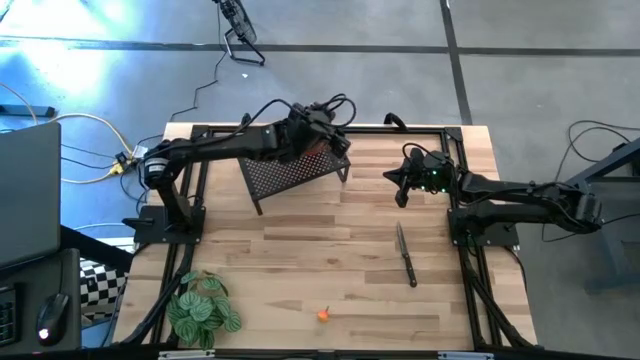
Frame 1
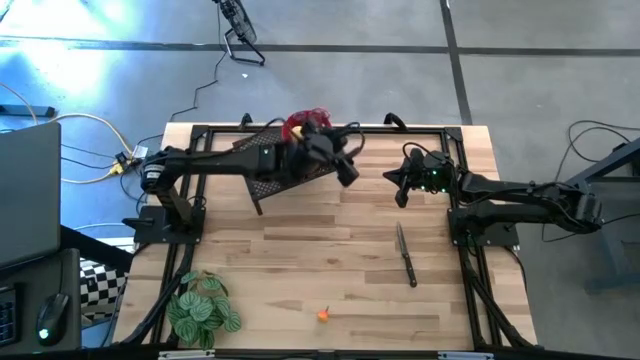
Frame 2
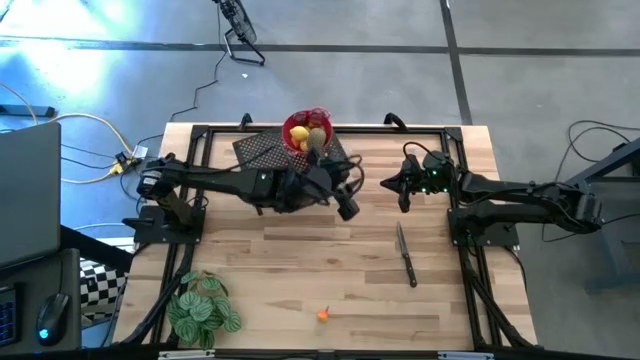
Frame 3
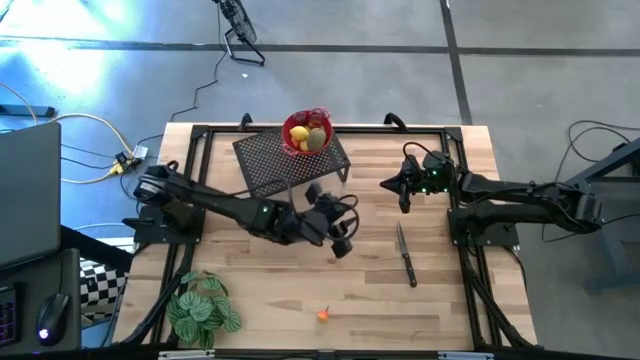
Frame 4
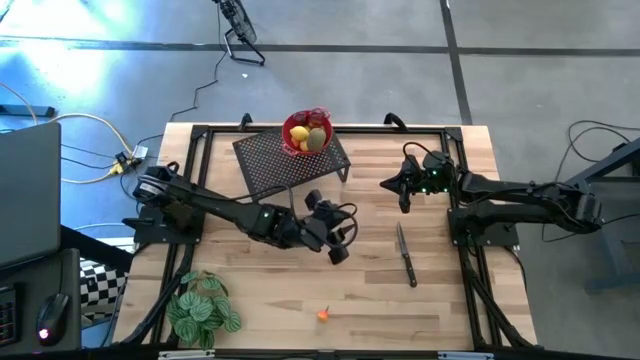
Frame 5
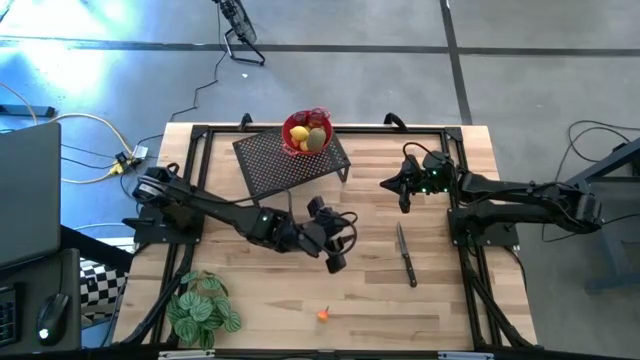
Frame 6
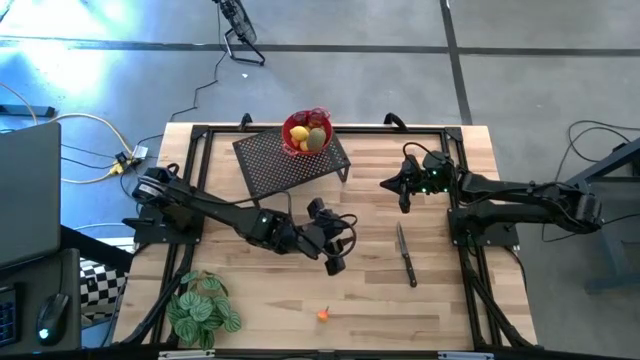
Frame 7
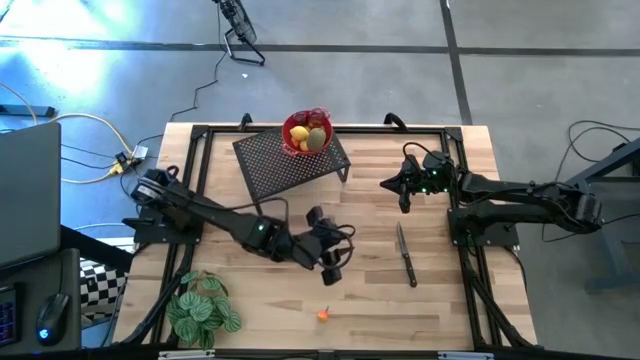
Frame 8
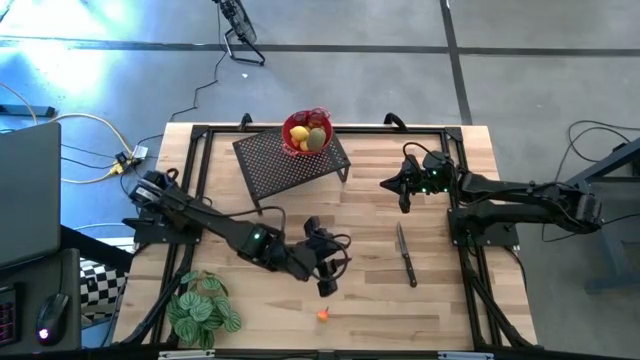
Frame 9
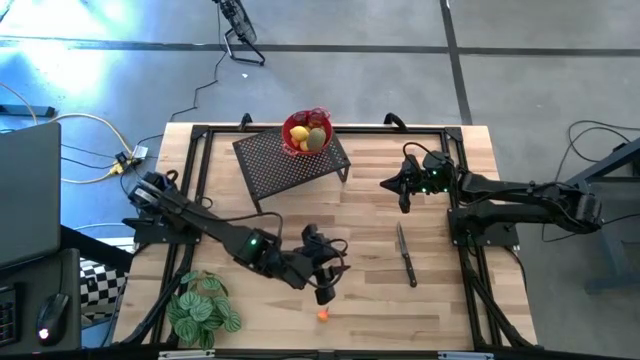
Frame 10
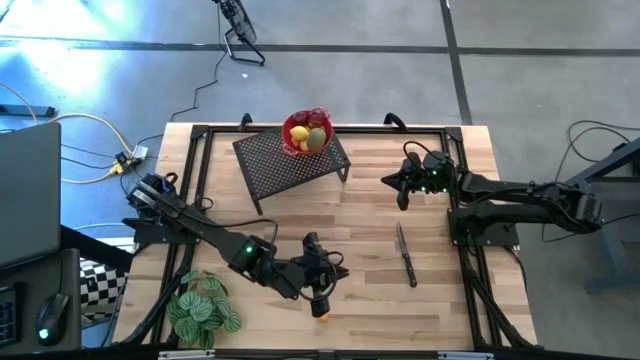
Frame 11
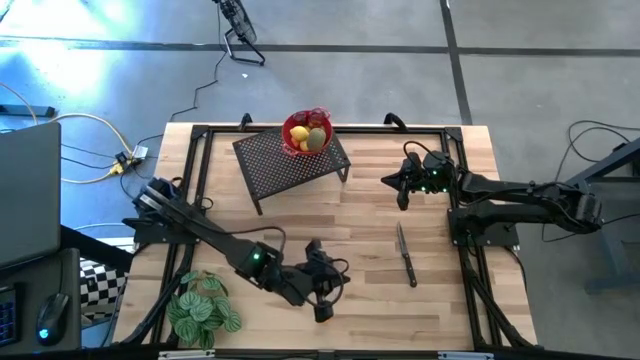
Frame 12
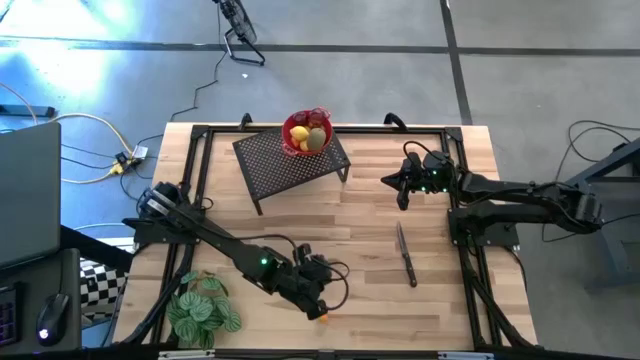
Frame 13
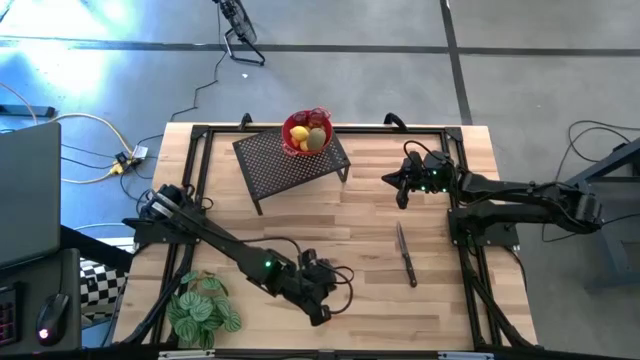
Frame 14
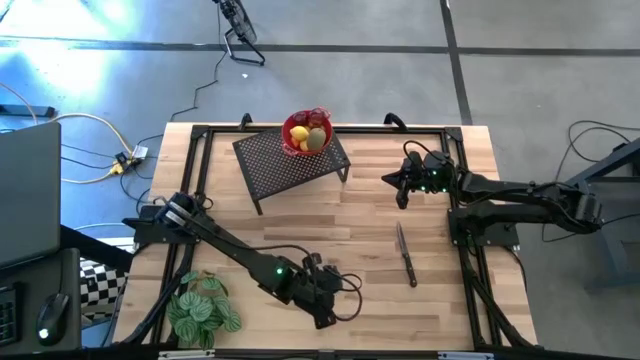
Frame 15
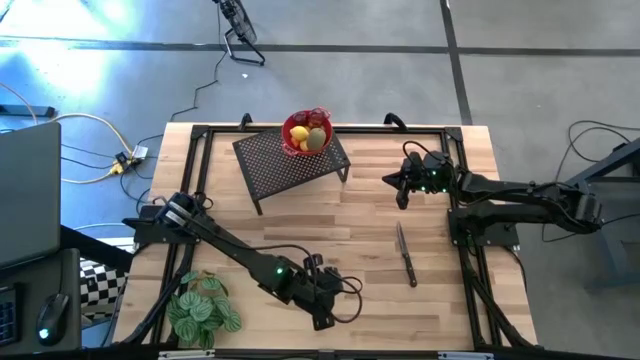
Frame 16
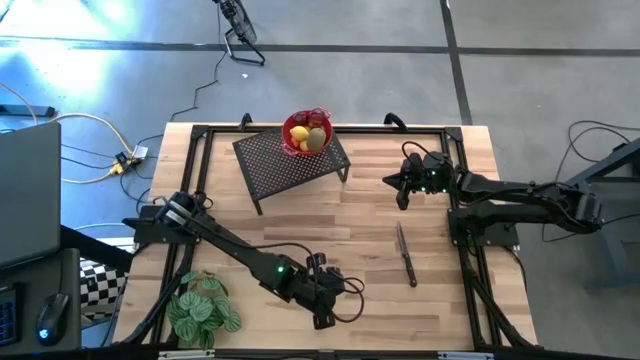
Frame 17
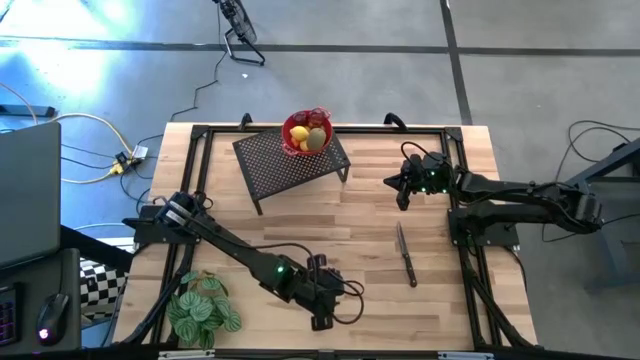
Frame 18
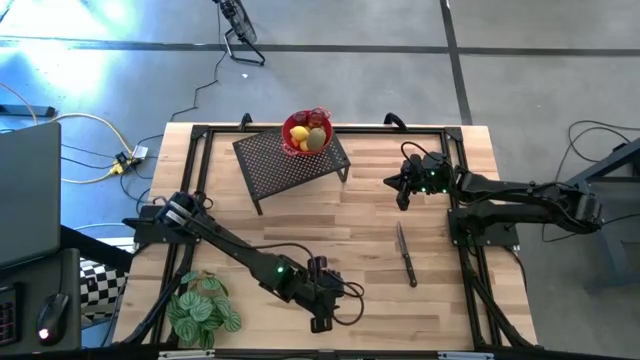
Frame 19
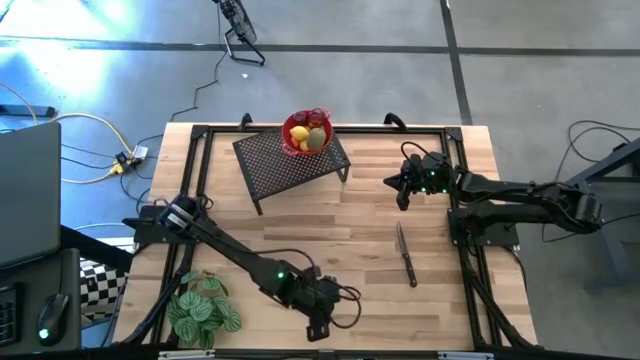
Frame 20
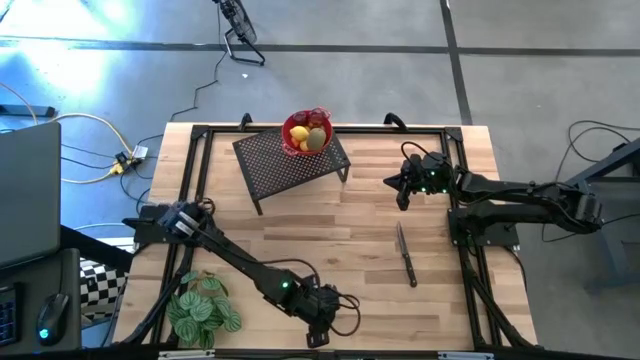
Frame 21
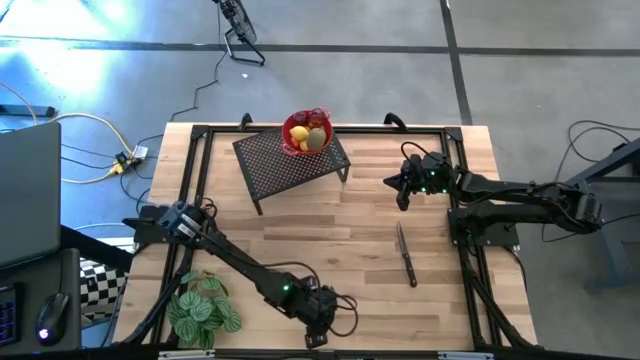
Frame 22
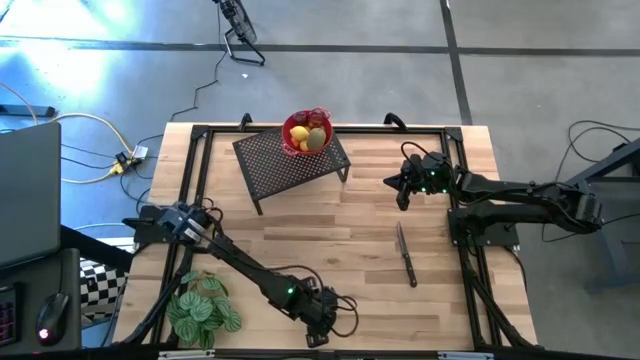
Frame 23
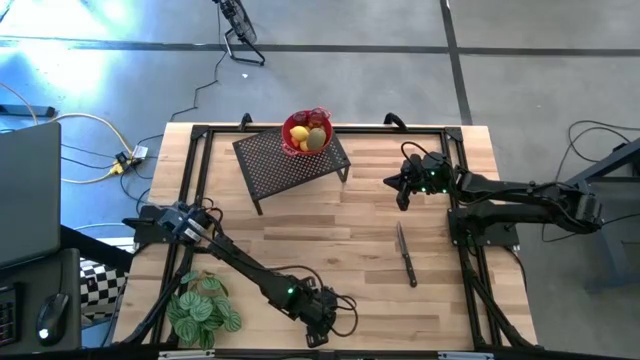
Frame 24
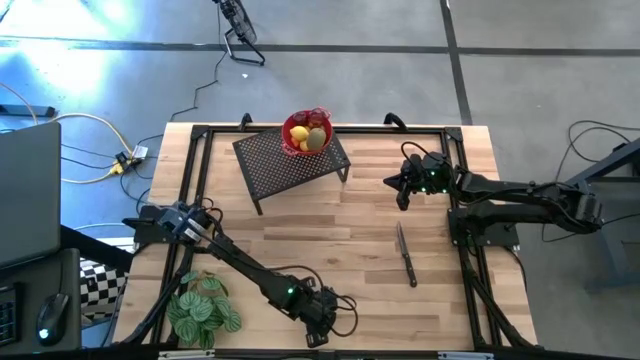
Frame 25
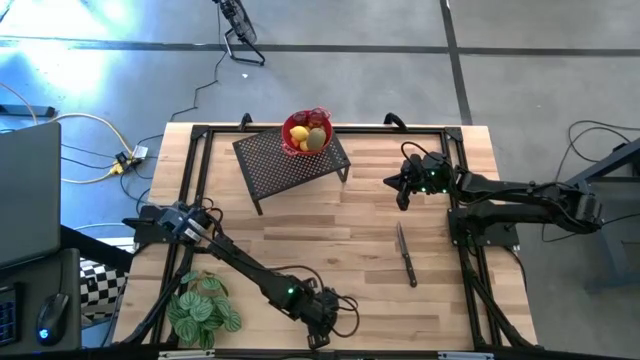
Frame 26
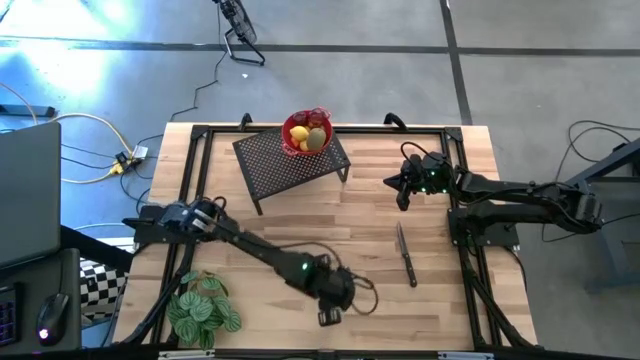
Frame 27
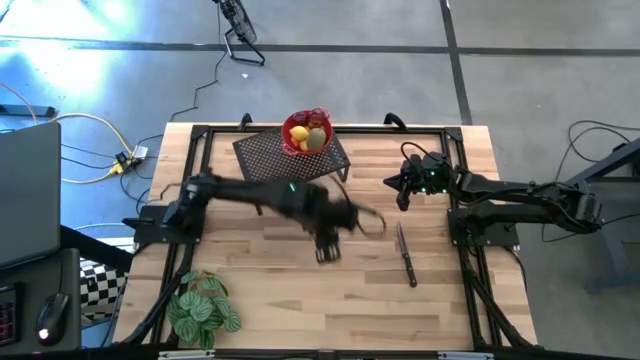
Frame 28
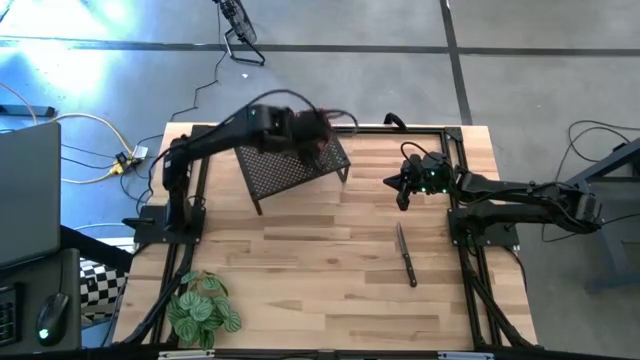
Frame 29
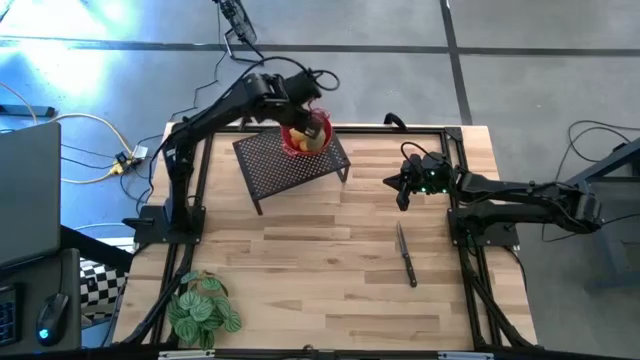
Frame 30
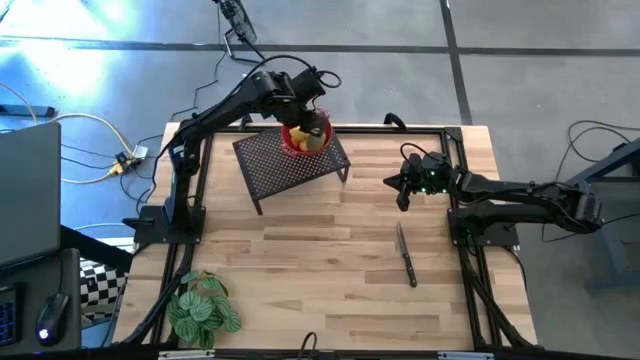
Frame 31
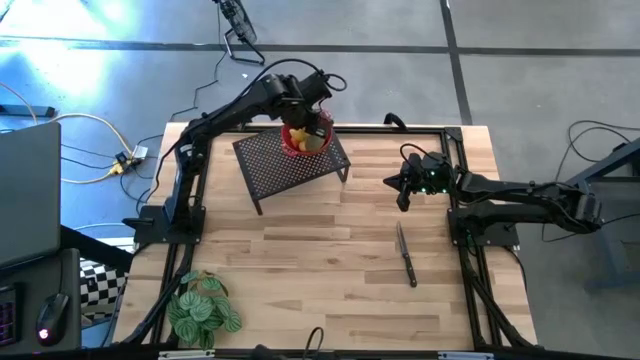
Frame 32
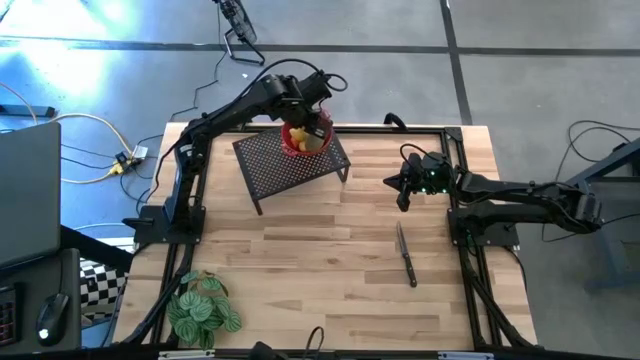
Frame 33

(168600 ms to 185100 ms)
Task: Pick & Place Fruit
Put the pear into the red strainer bowl on the shelf

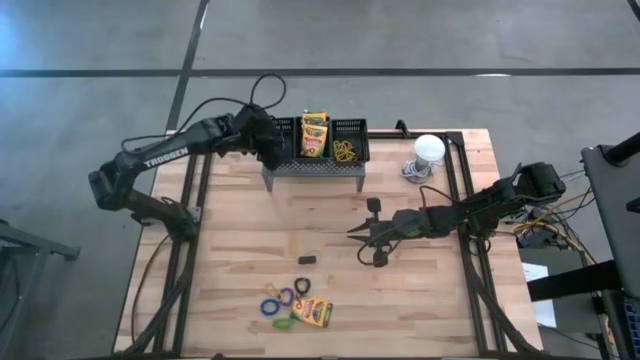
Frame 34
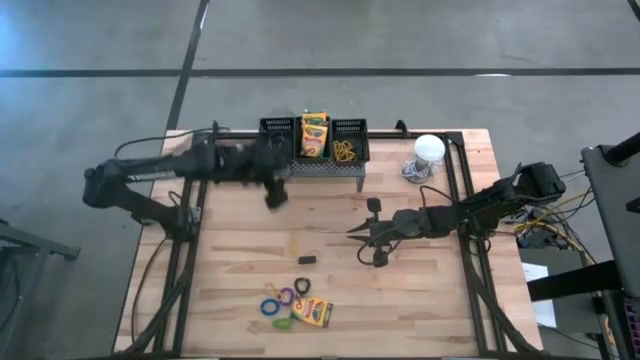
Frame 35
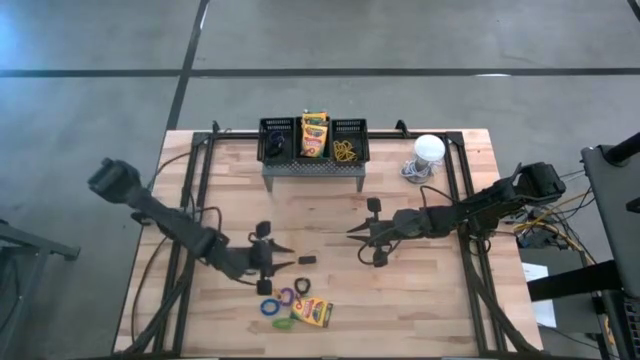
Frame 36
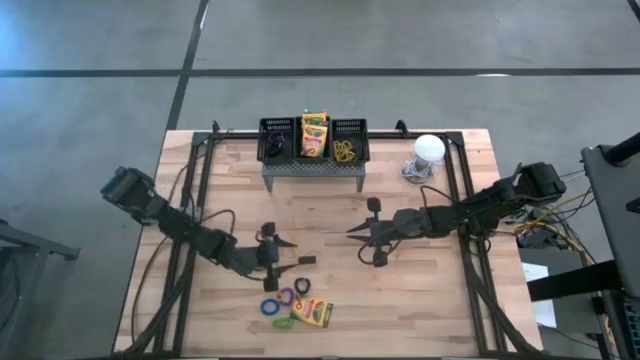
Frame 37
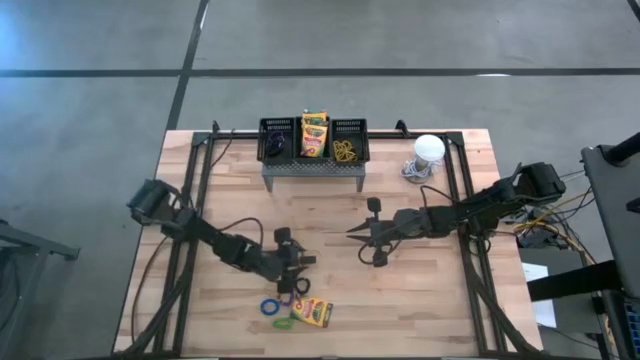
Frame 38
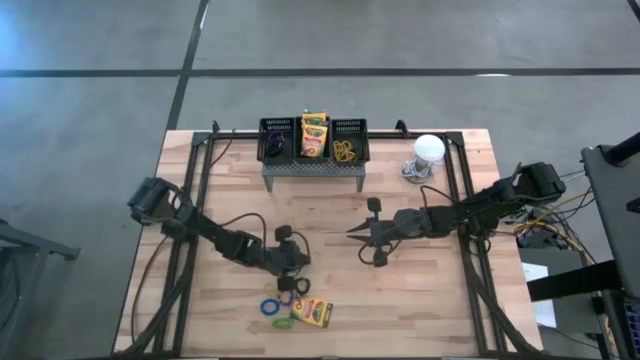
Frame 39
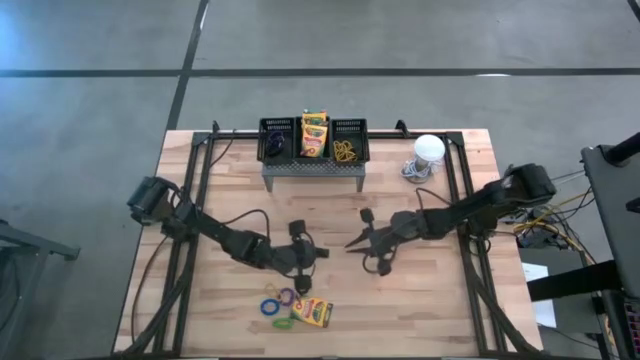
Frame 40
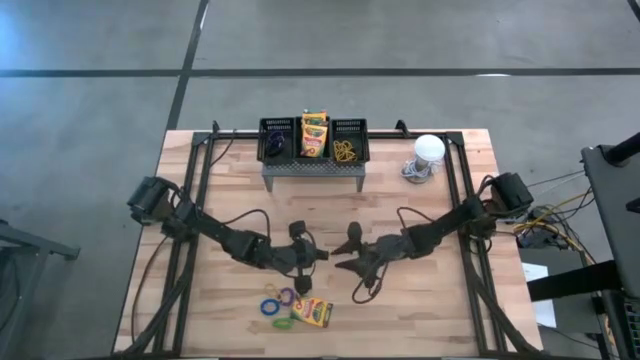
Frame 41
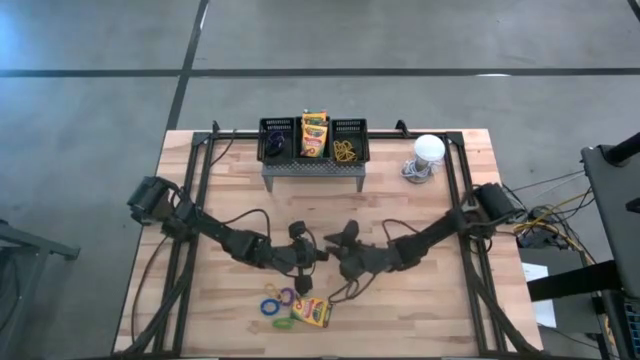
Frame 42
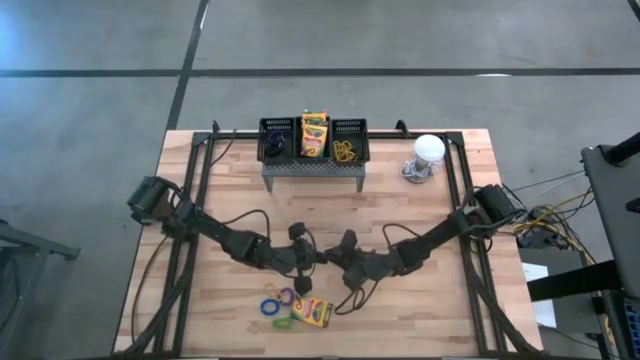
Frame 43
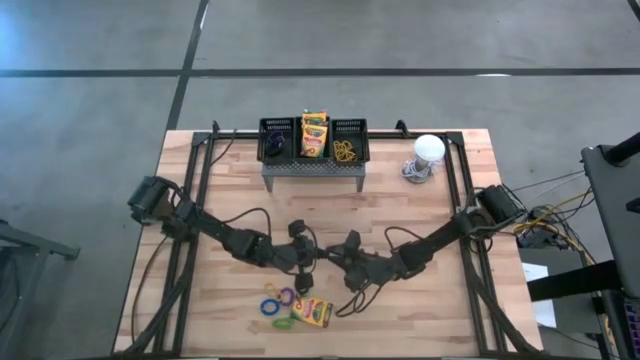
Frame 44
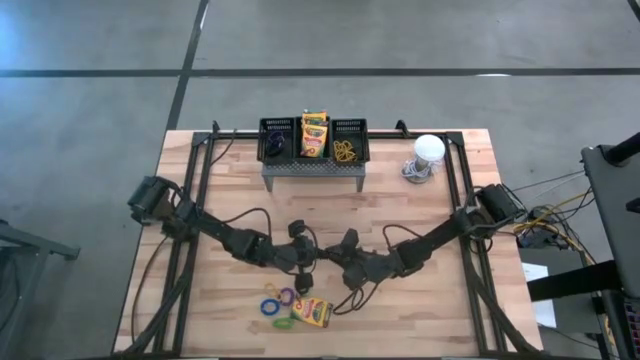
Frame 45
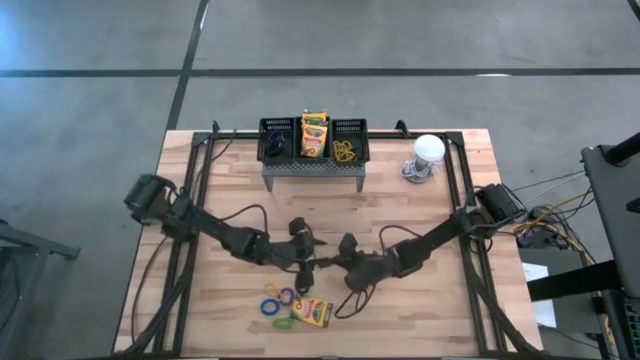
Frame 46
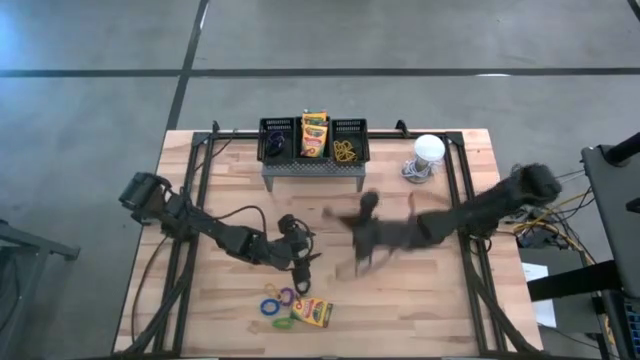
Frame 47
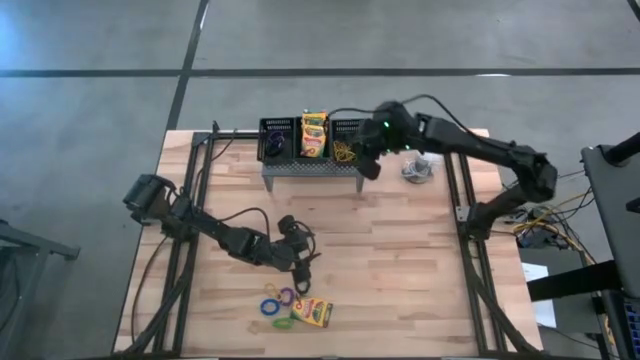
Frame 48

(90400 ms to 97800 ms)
Task: Pick & Place Office Desk Supplies
Put the right black rubber band into the right black basket on the shelf
